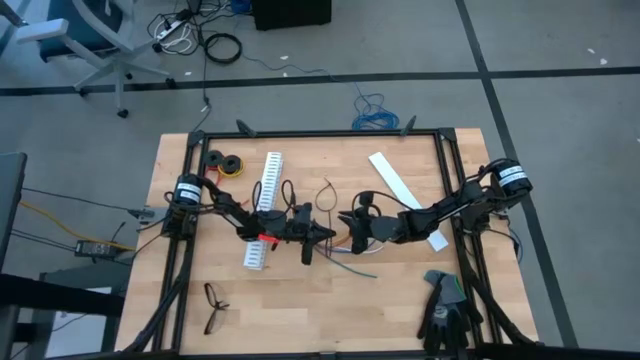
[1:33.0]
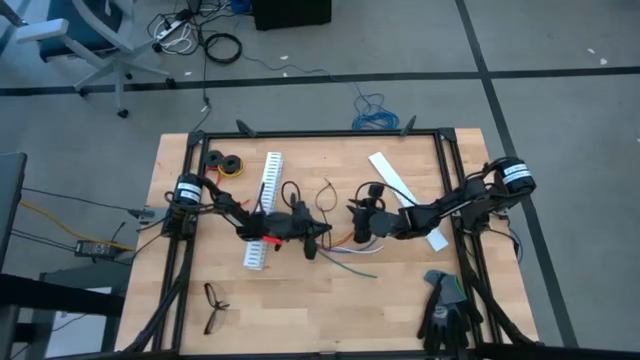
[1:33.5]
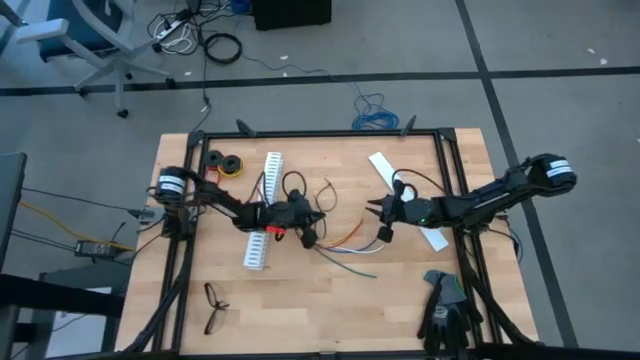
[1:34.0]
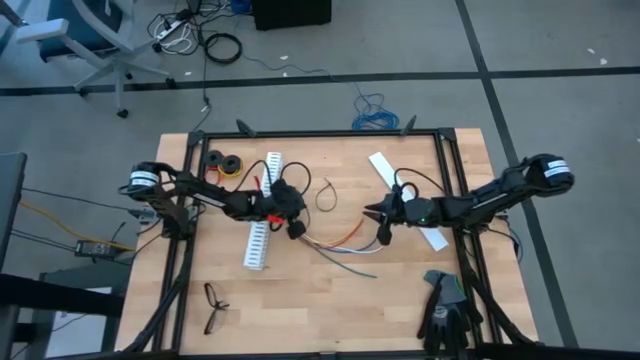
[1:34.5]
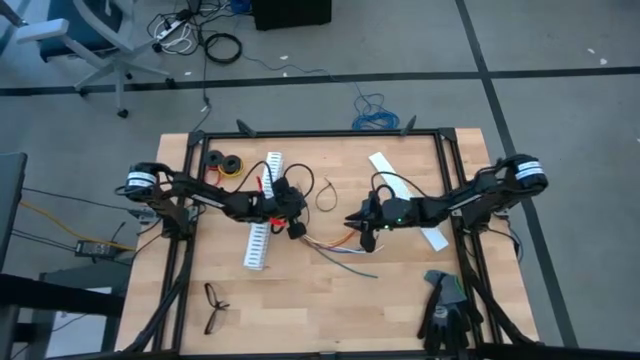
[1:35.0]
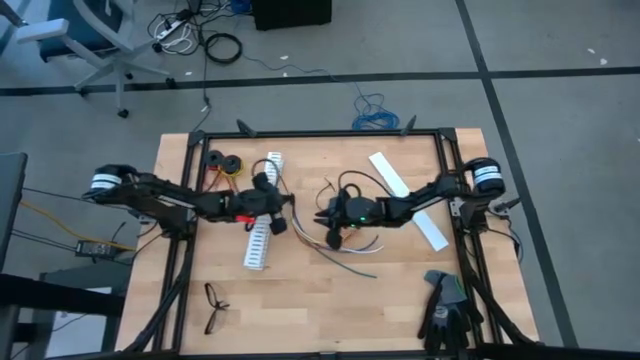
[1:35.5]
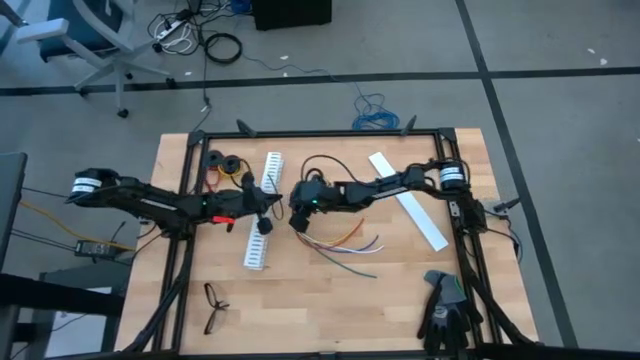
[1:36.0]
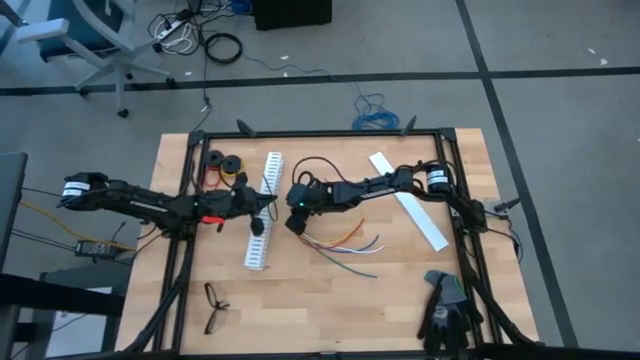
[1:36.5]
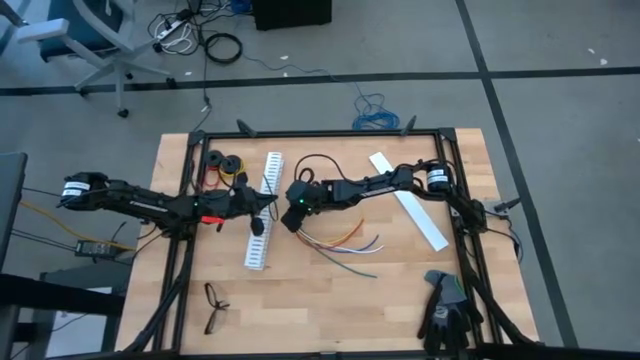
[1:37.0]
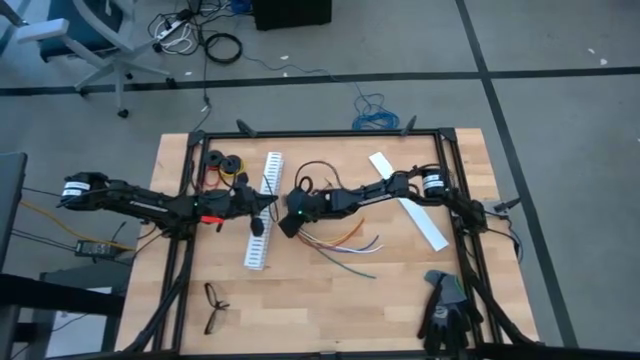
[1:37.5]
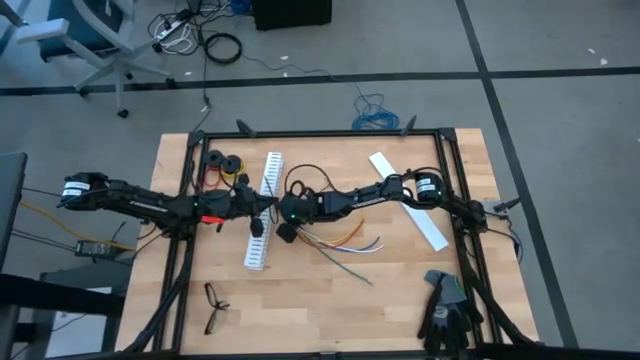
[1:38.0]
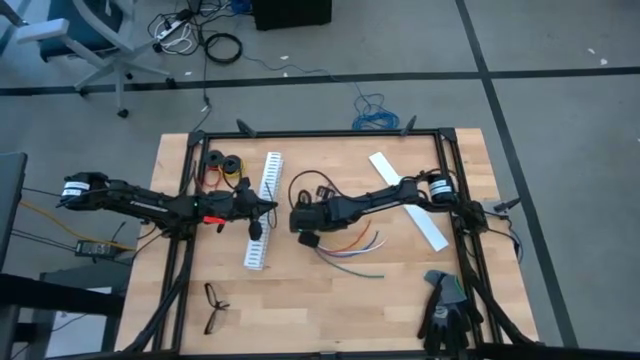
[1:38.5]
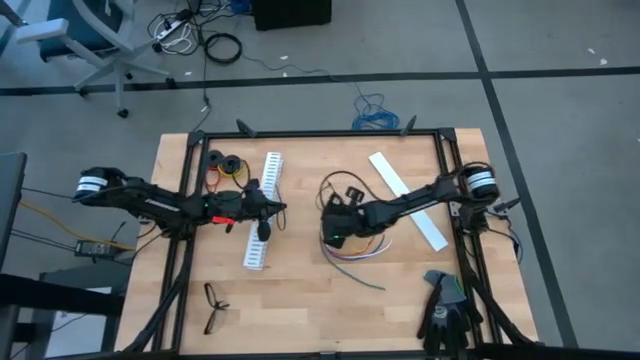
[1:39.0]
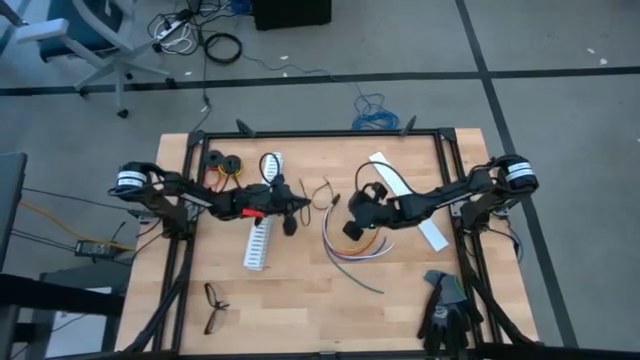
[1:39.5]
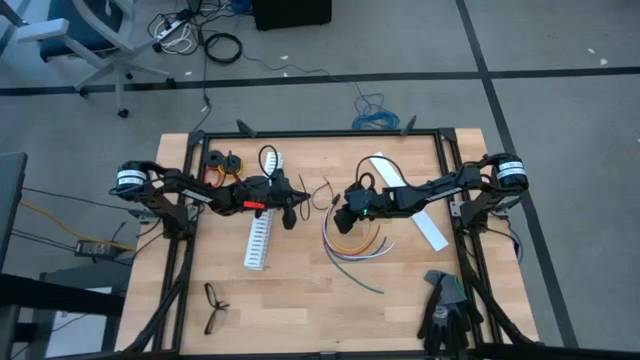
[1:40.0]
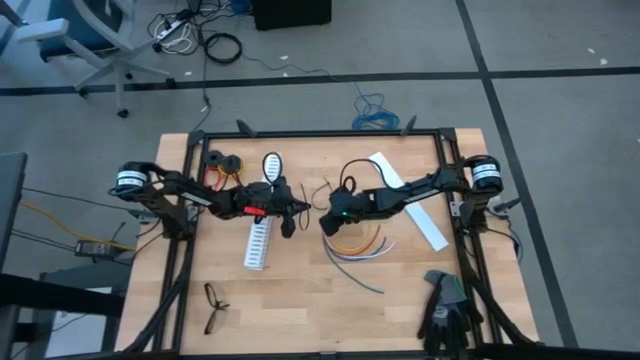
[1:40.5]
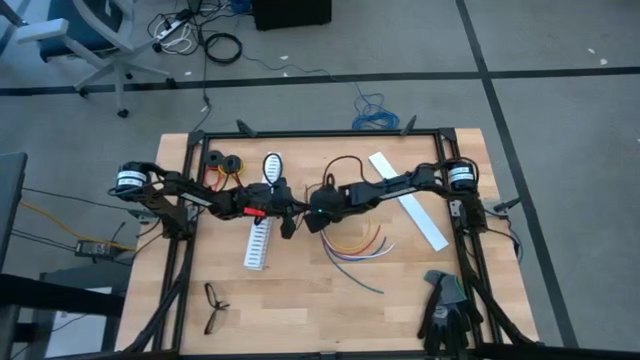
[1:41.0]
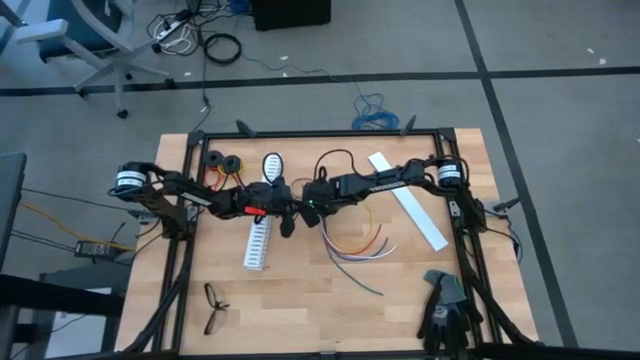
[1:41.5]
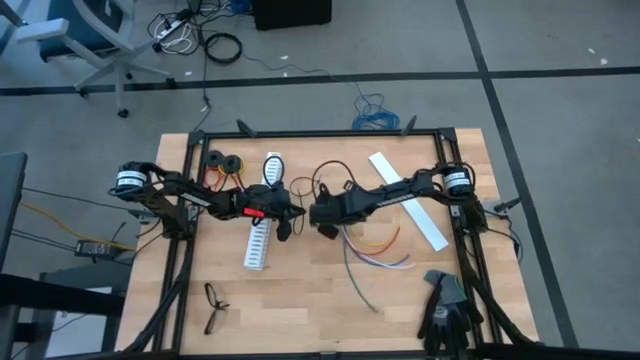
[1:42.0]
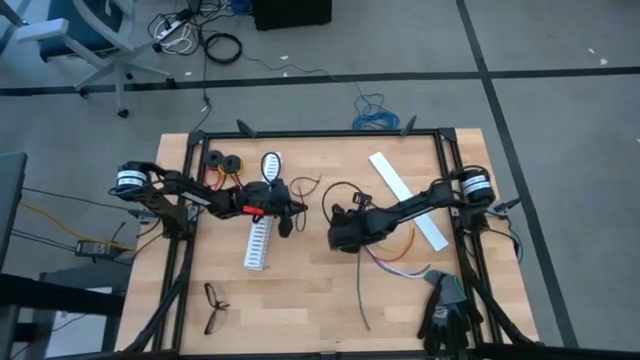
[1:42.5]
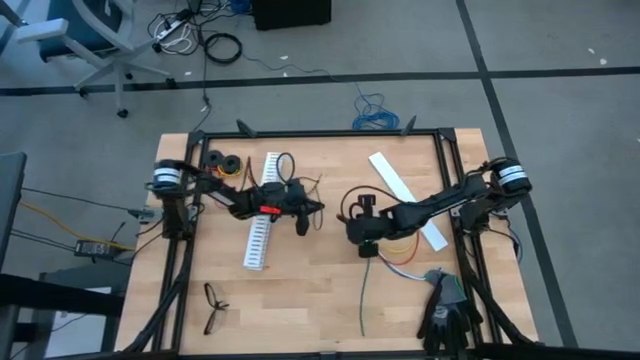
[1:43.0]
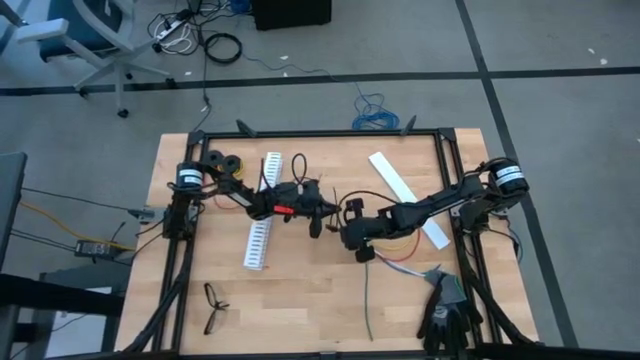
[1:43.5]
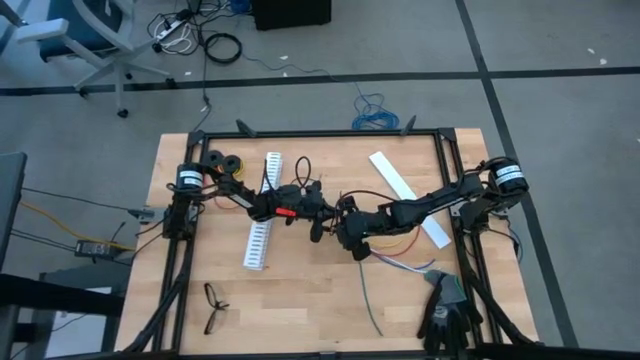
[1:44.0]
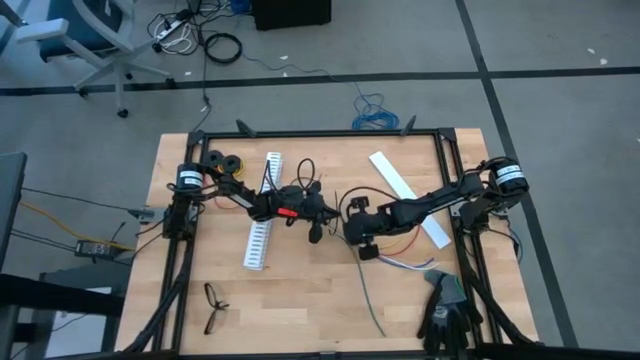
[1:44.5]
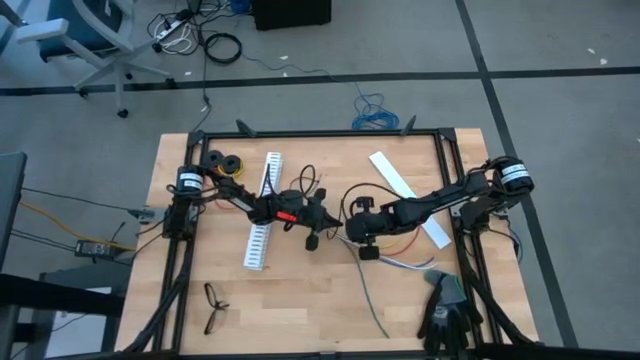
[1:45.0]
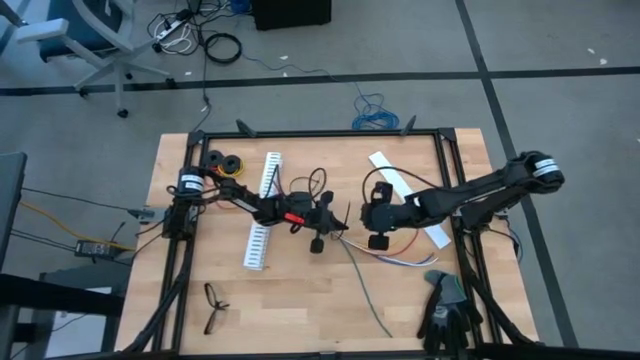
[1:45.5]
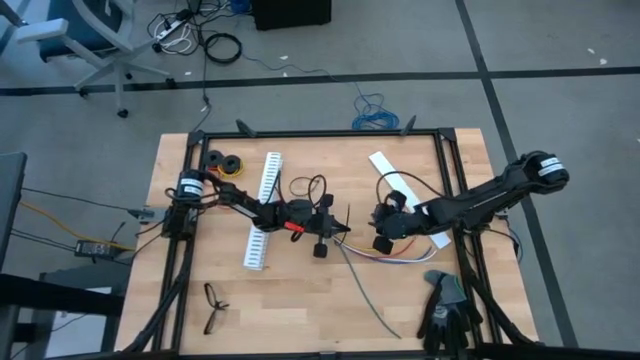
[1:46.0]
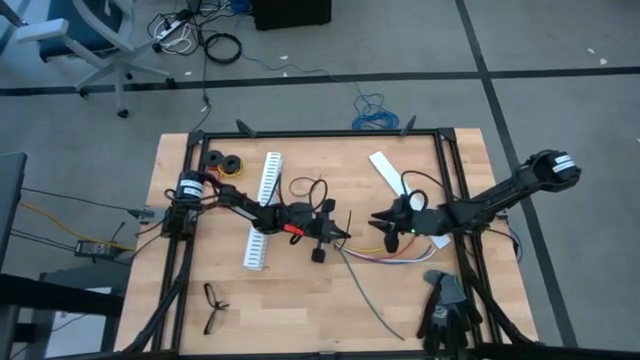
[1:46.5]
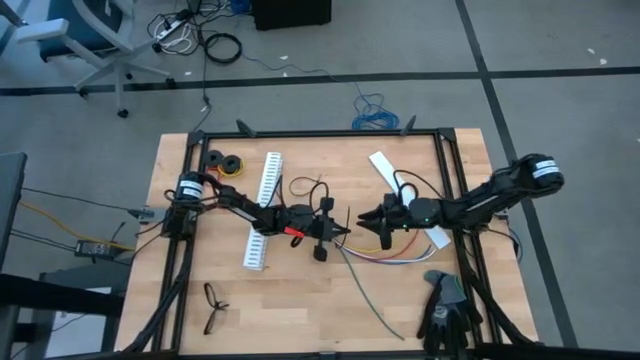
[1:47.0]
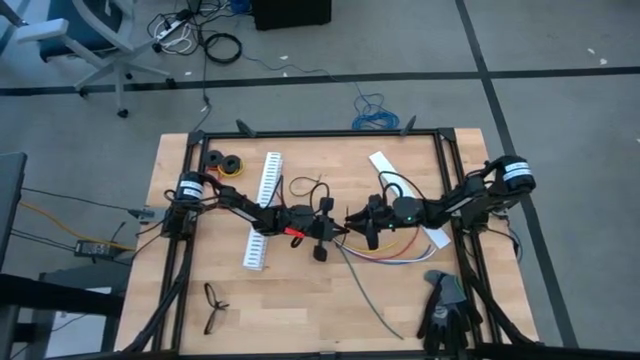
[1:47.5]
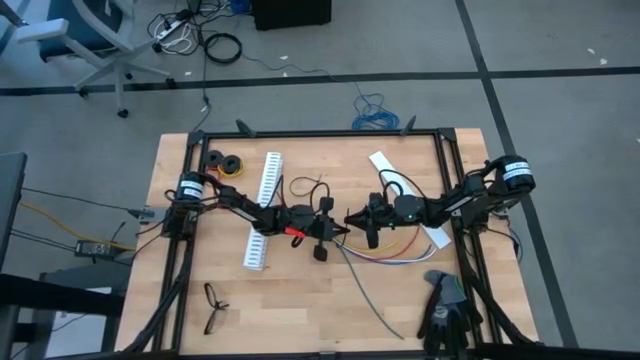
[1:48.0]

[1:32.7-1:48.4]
Task: Ziptie cables
Wrap the cable wires with the black zip tie

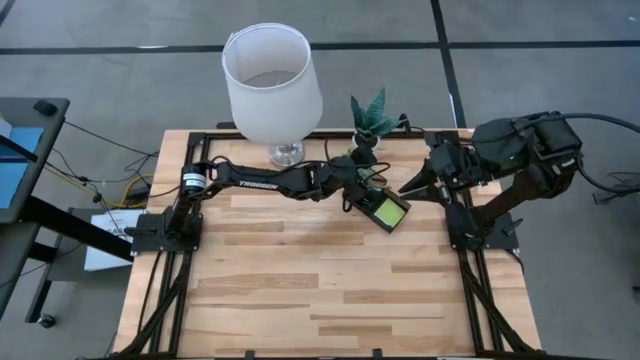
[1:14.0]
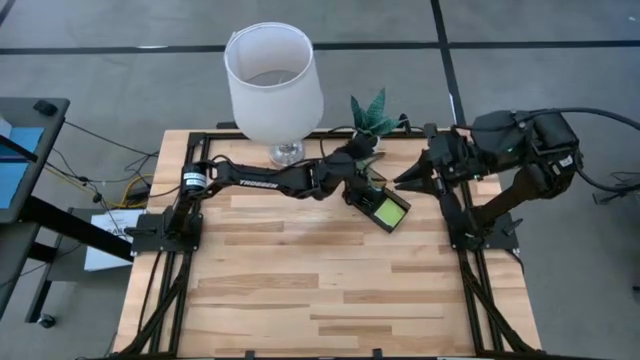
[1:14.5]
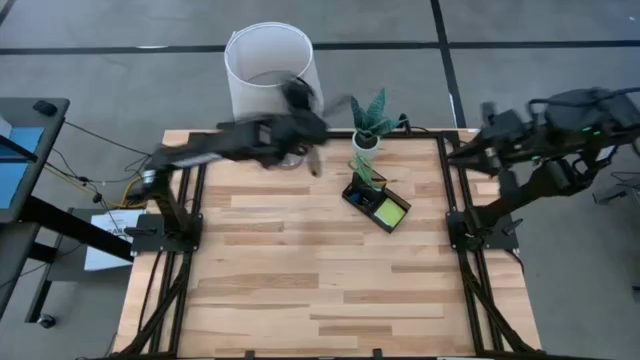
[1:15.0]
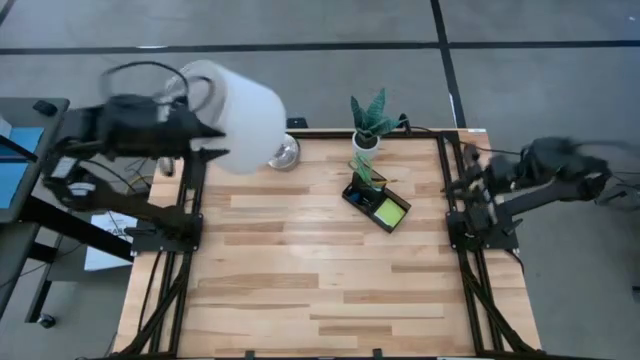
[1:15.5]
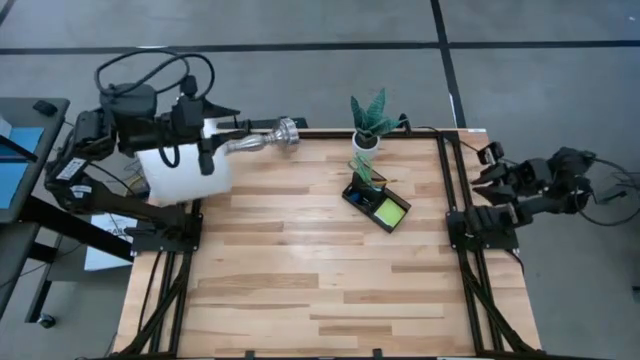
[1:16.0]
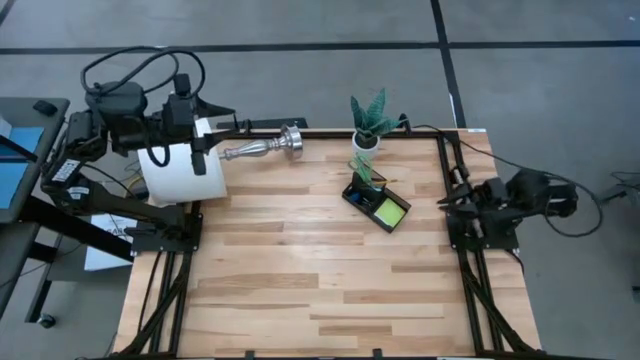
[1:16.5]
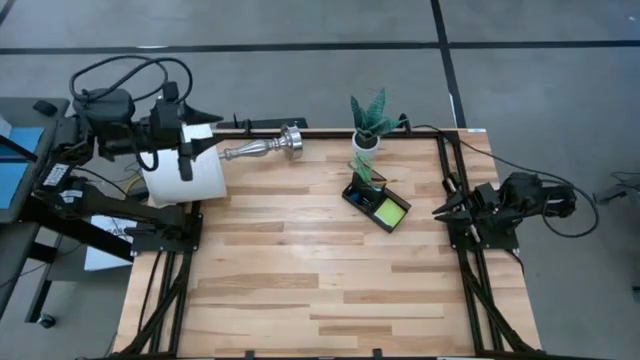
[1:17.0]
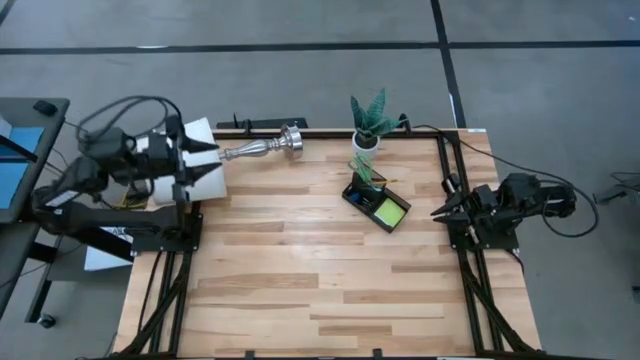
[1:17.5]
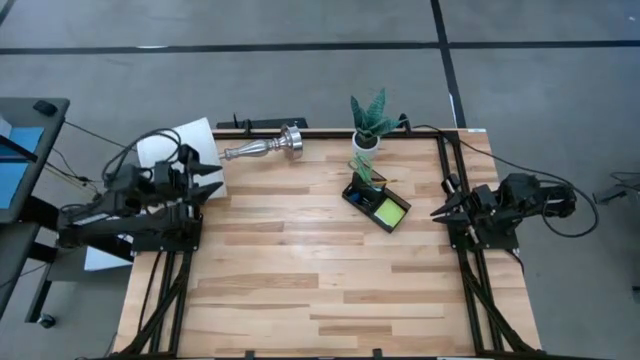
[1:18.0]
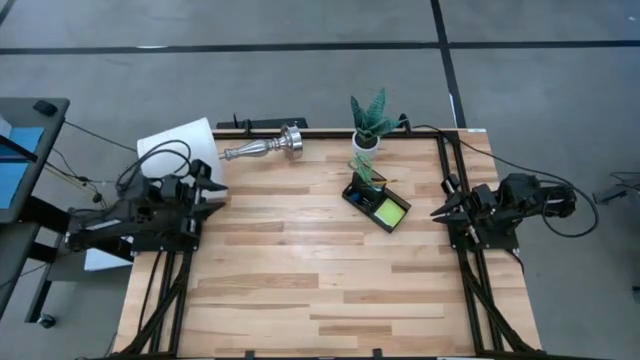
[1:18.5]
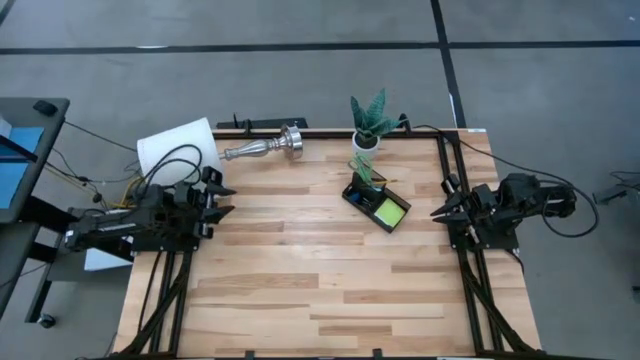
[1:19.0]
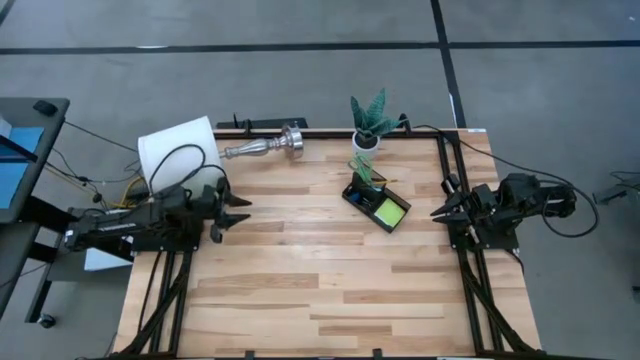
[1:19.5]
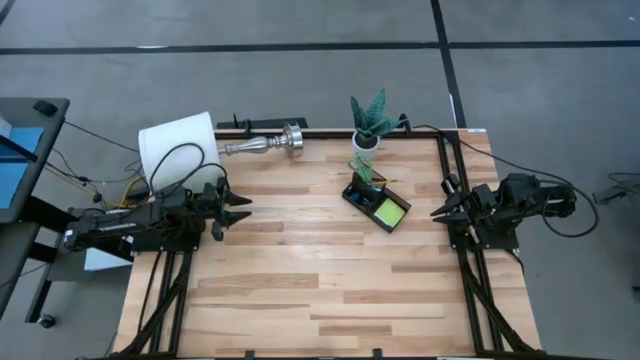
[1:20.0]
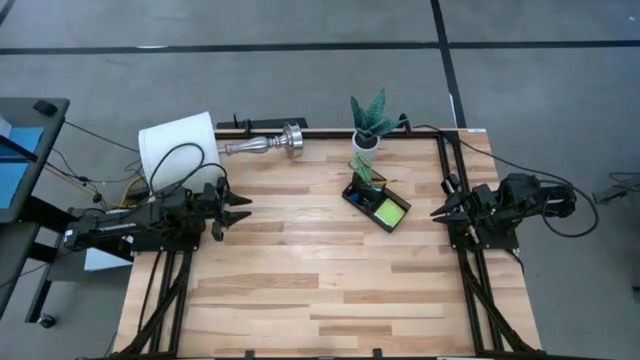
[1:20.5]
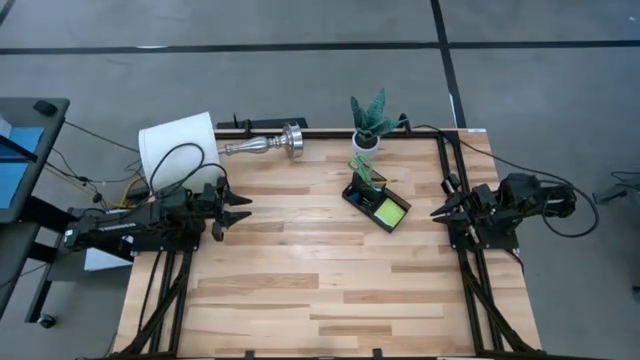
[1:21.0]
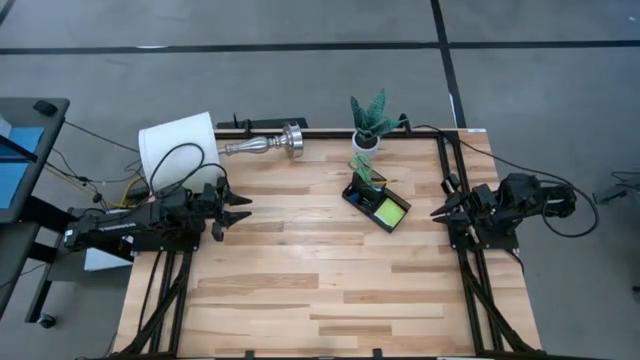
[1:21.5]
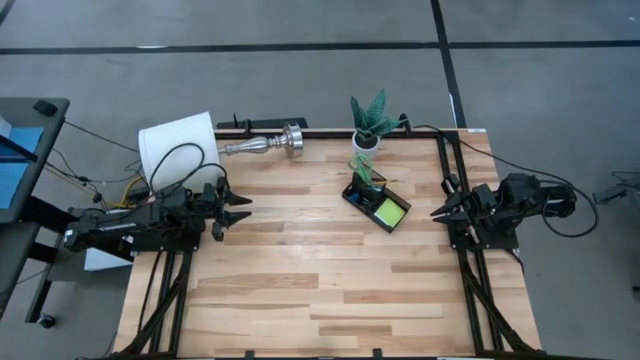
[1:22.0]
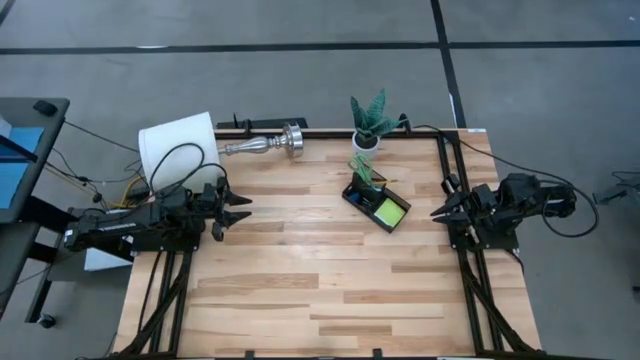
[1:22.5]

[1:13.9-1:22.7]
Task: Pick and place office supplies into organizer
Return to Home Position
